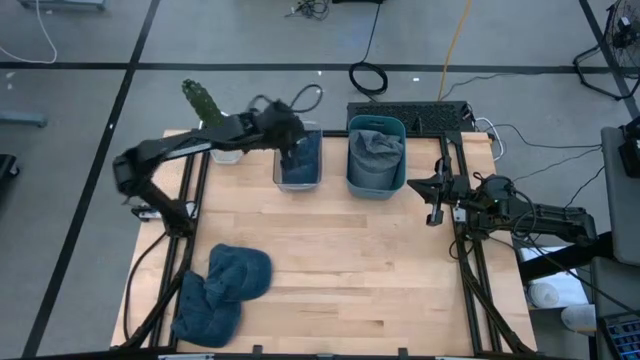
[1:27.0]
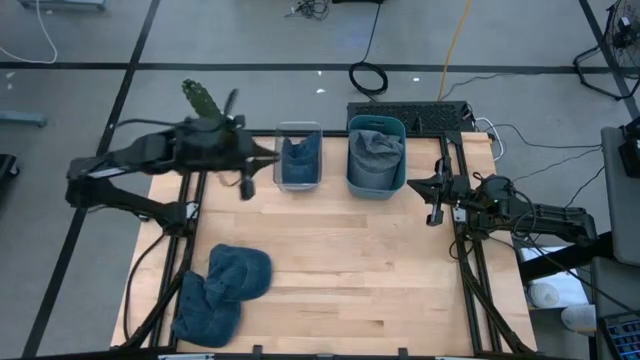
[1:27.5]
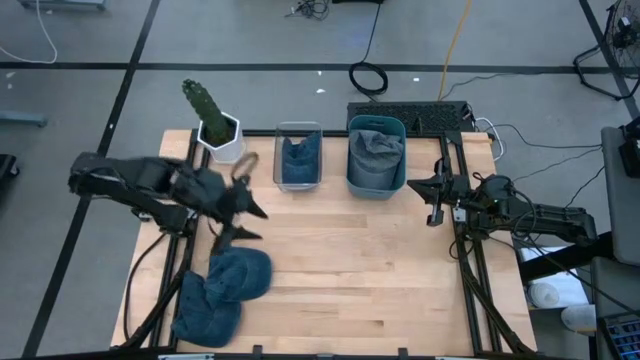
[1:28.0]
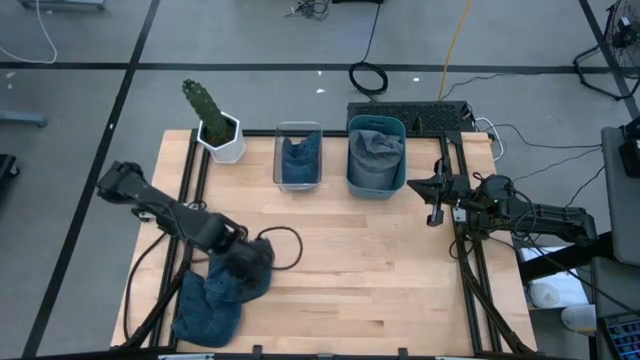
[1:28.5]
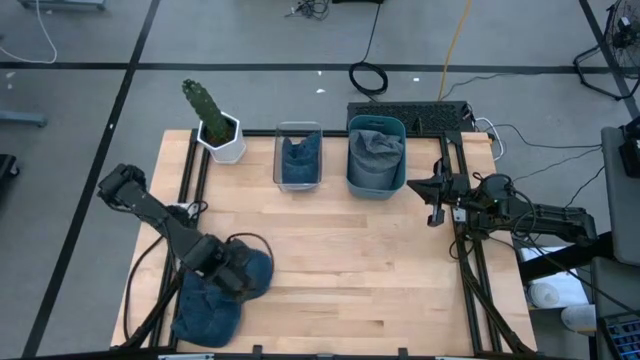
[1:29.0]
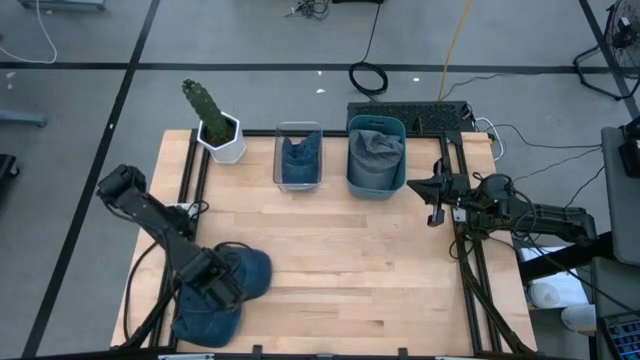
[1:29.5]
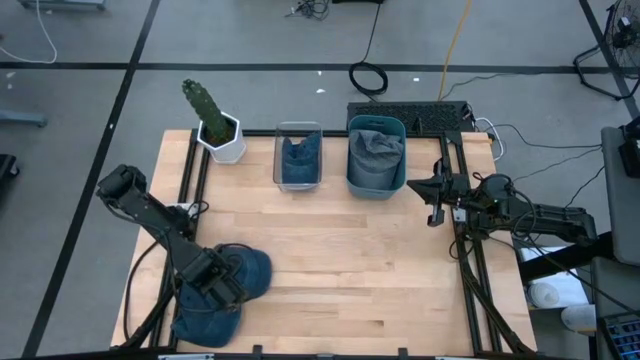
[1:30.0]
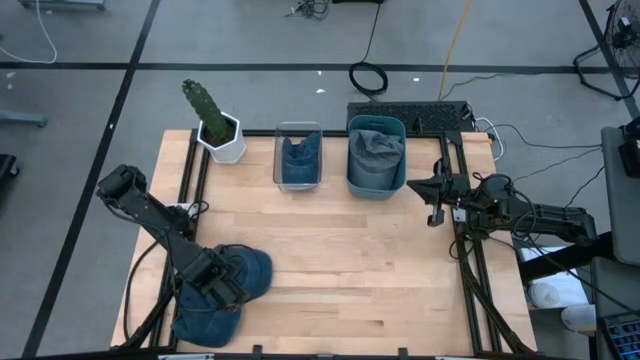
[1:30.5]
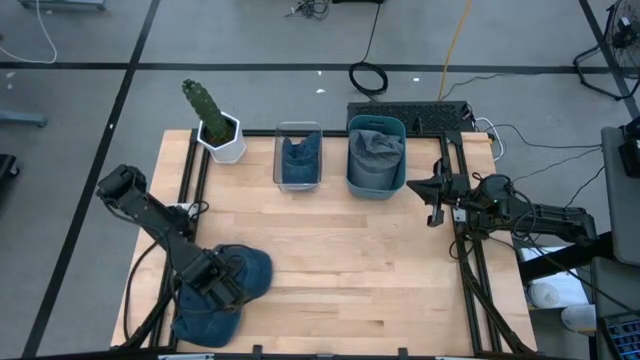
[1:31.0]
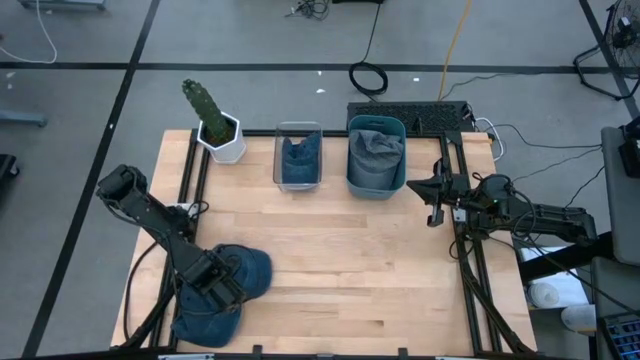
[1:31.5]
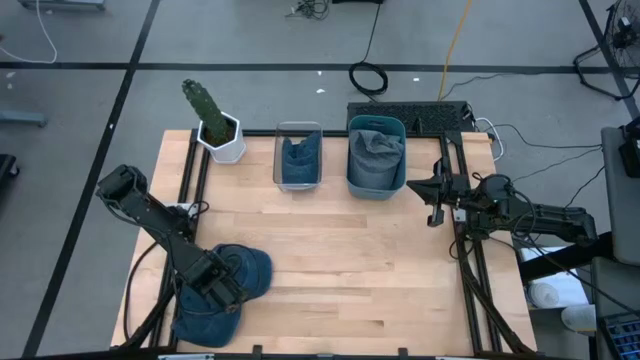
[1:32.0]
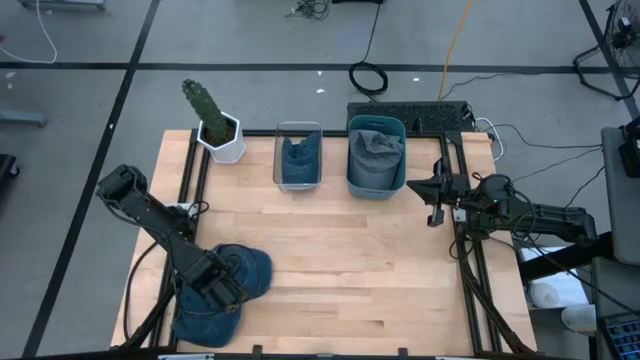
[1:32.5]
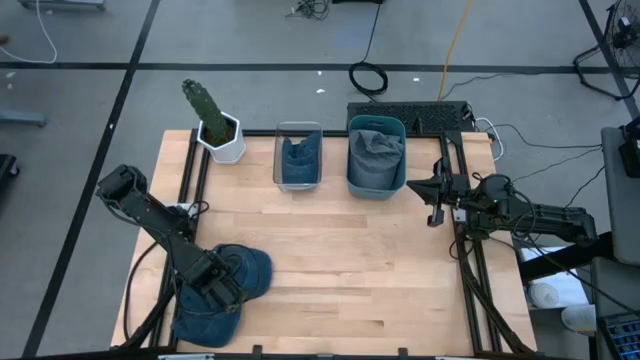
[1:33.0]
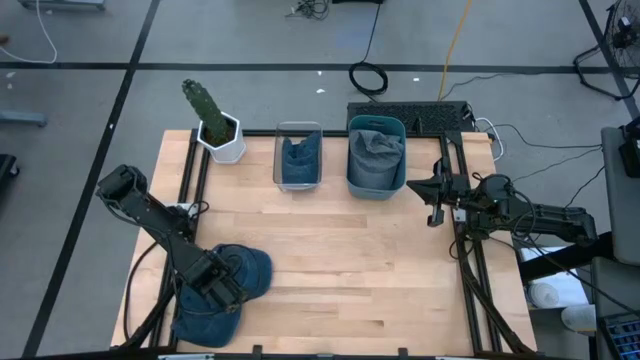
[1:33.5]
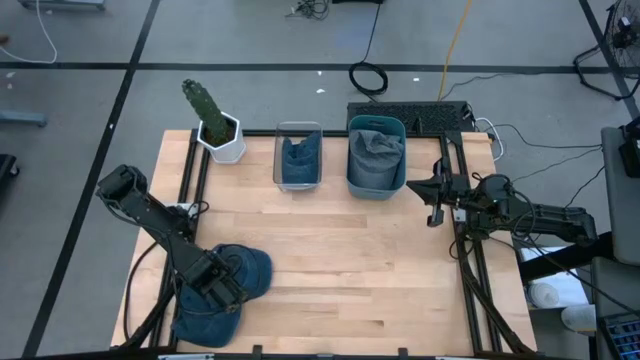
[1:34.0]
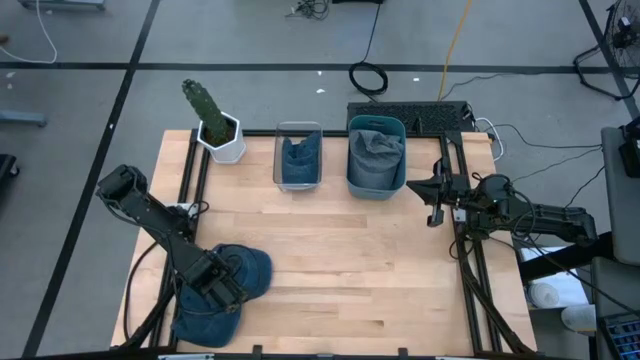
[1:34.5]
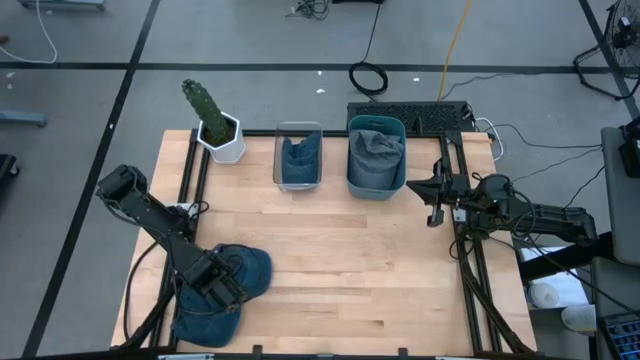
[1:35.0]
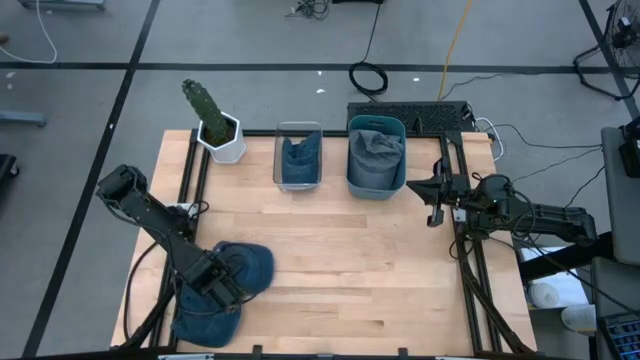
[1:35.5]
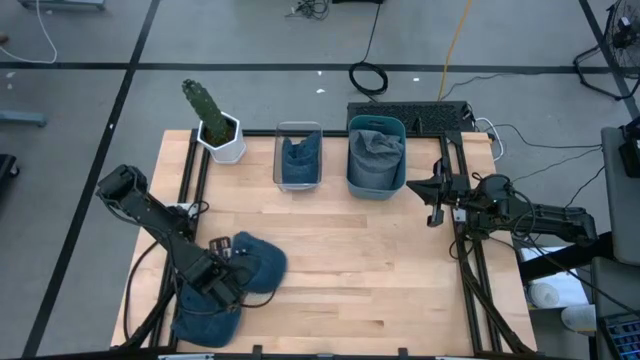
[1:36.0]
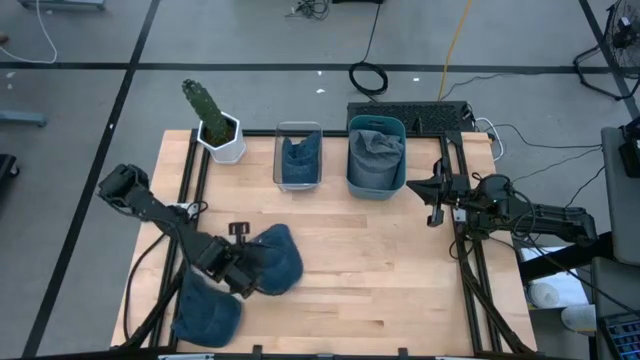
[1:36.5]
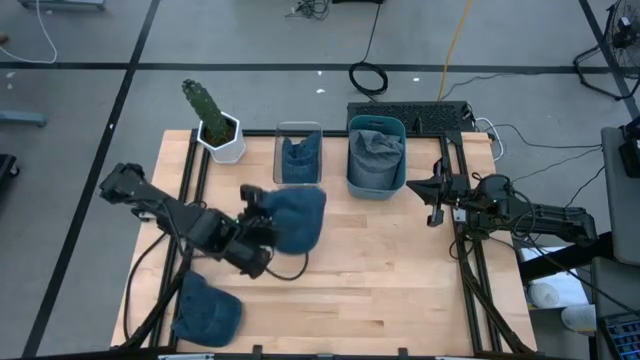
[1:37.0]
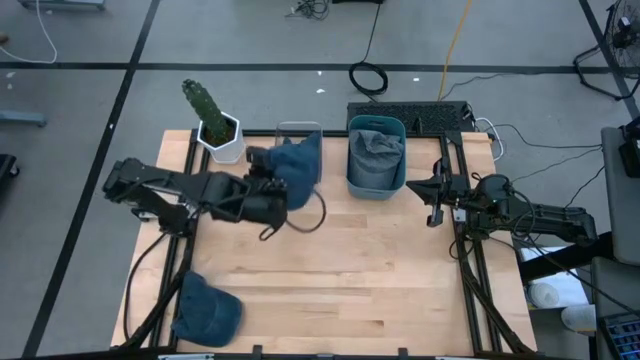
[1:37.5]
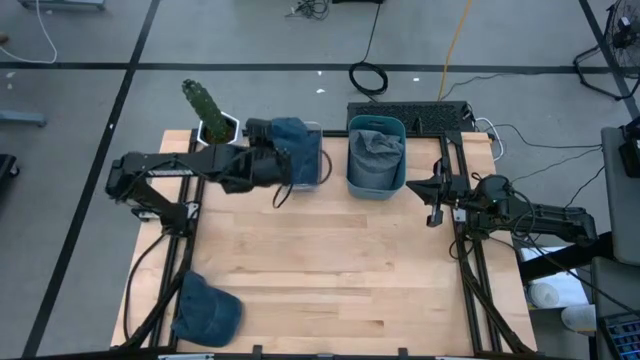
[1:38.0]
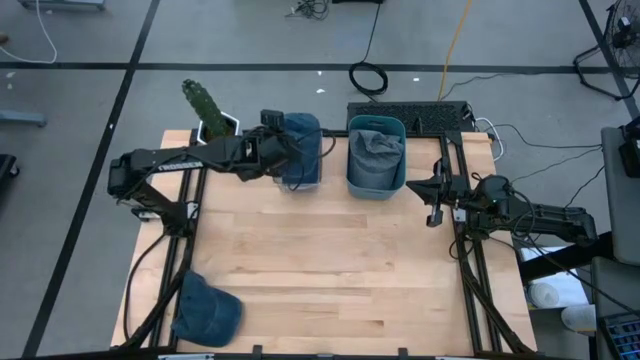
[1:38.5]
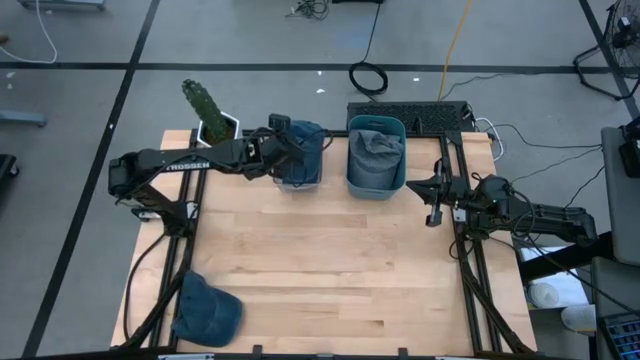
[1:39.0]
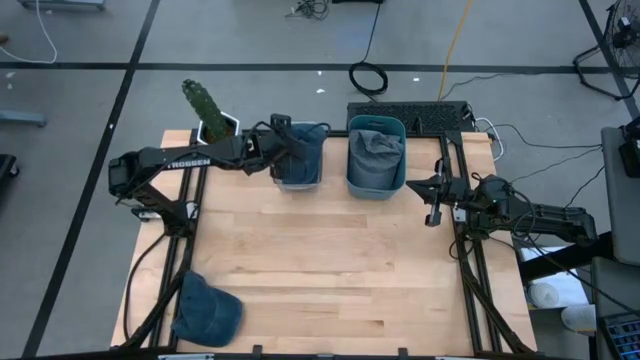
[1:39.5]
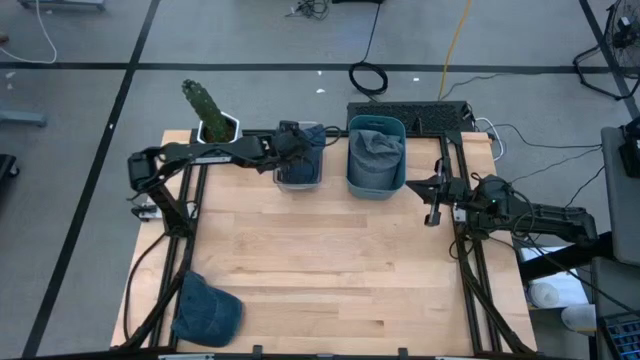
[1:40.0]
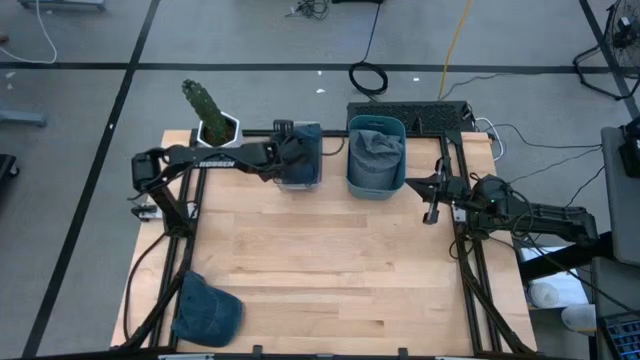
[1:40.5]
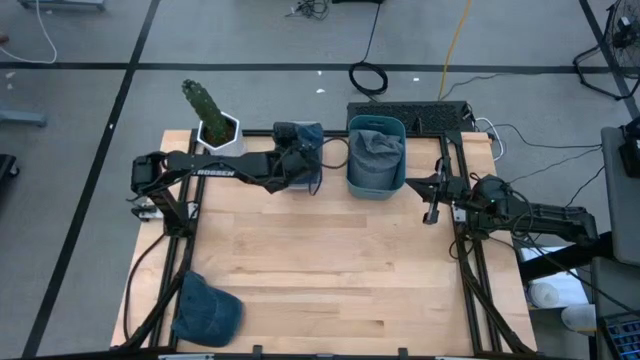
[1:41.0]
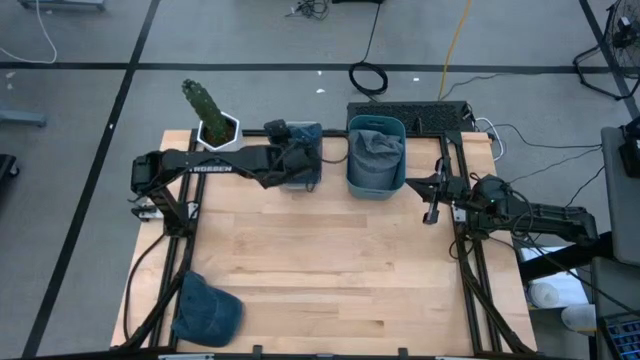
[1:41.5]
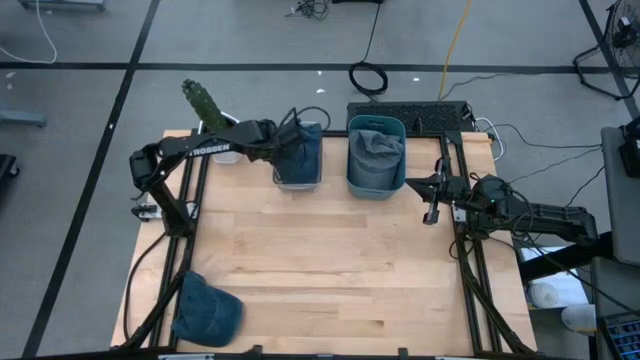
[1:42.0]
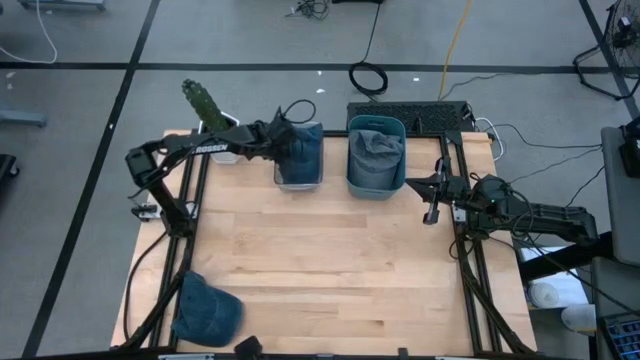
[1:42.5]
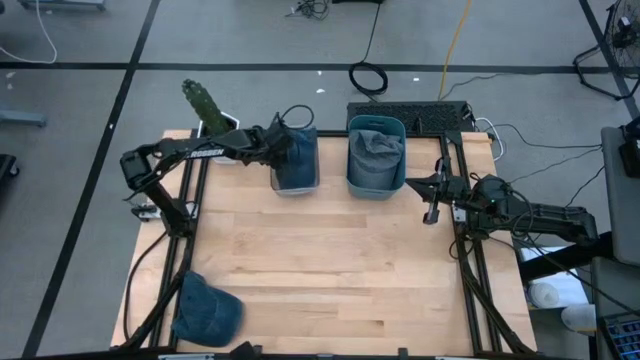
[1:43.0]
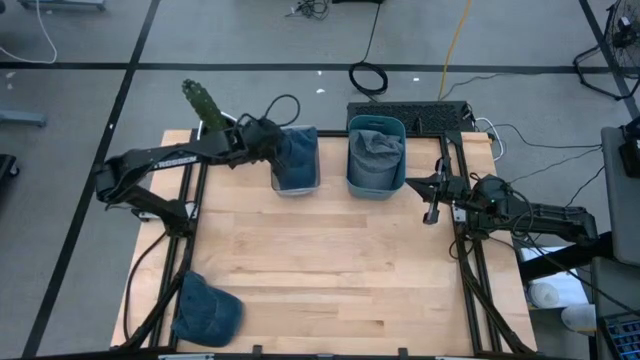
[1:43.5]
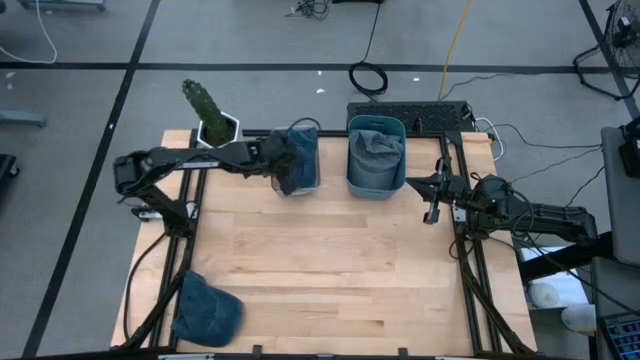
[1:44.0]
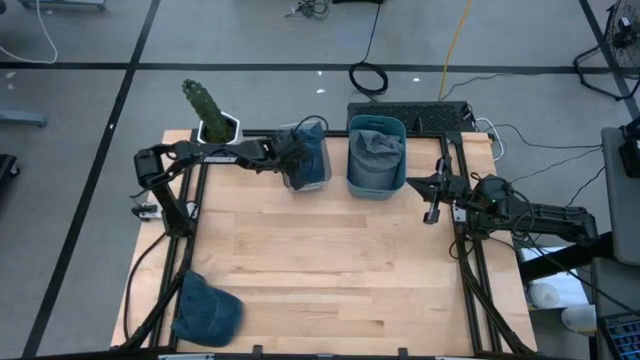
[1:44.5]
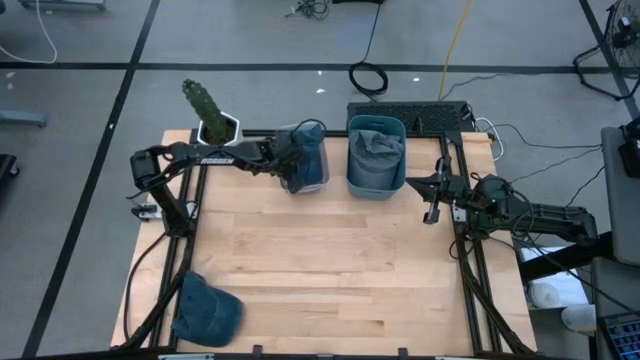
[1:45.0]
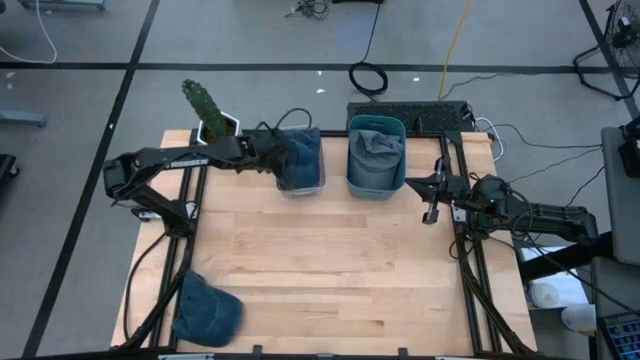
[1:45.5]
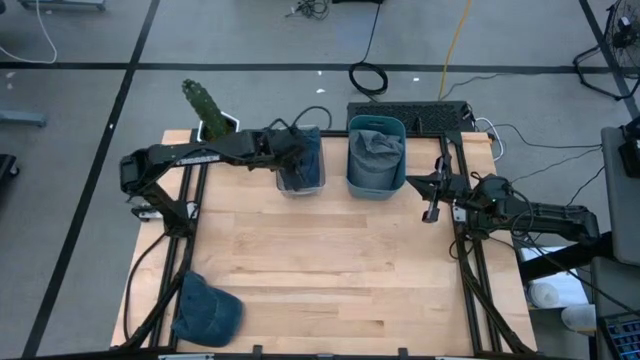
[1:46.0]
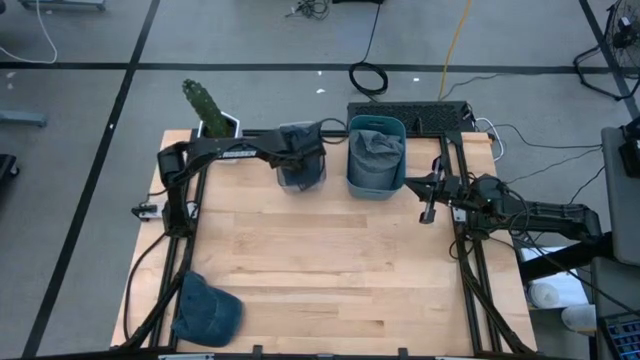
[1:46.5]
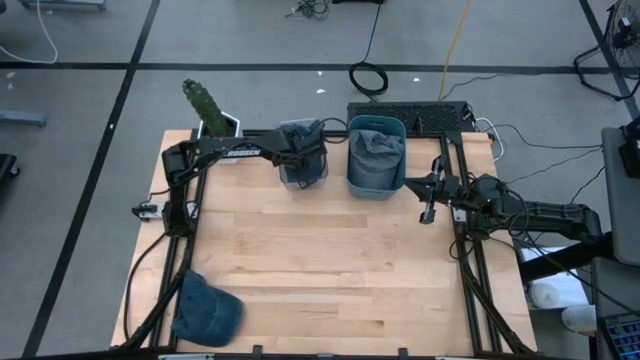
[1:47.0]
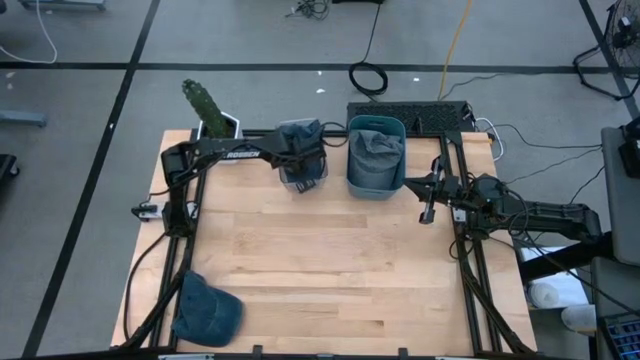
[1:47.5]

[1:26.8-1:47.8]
Task: Pick & Place hat
Put the top blue cap into the transparent bin

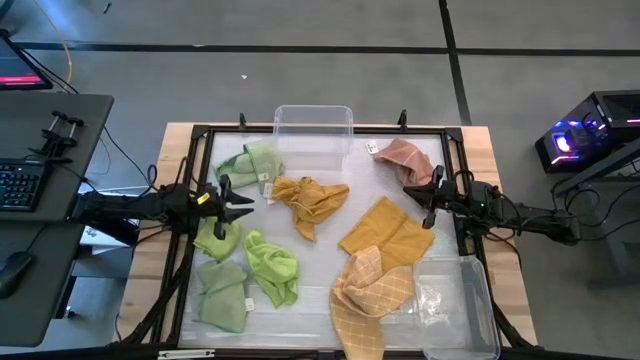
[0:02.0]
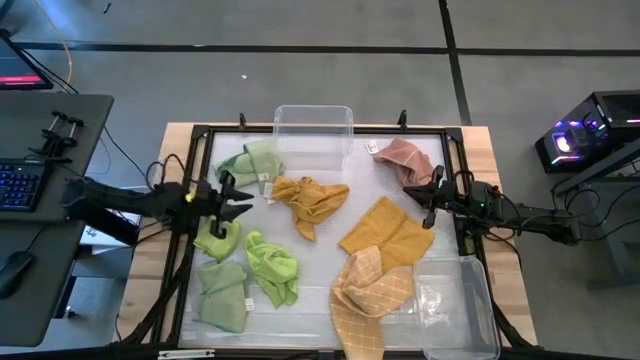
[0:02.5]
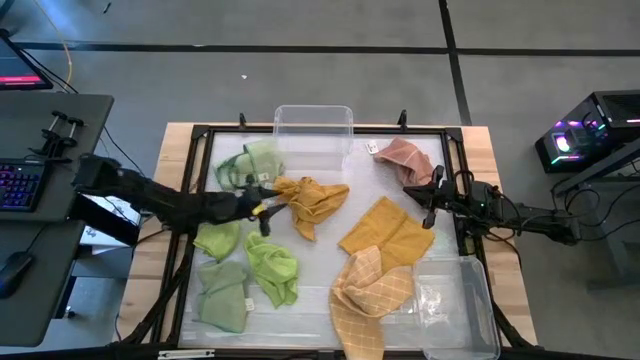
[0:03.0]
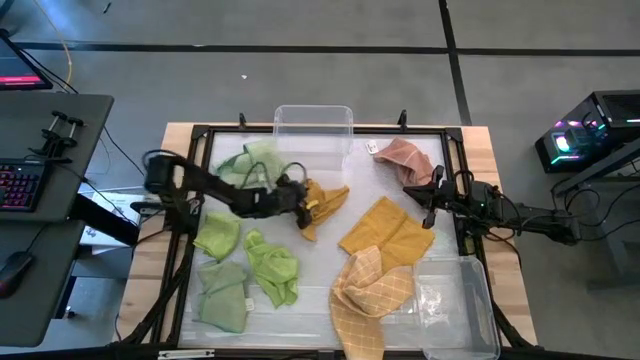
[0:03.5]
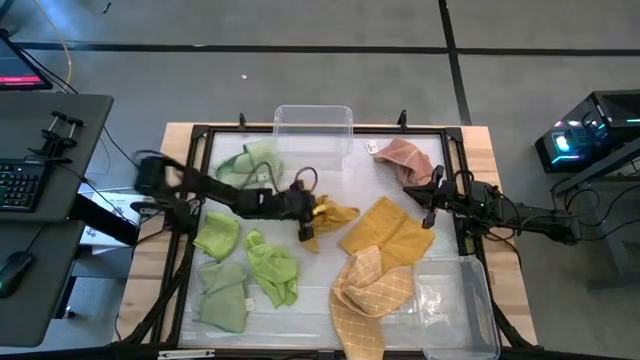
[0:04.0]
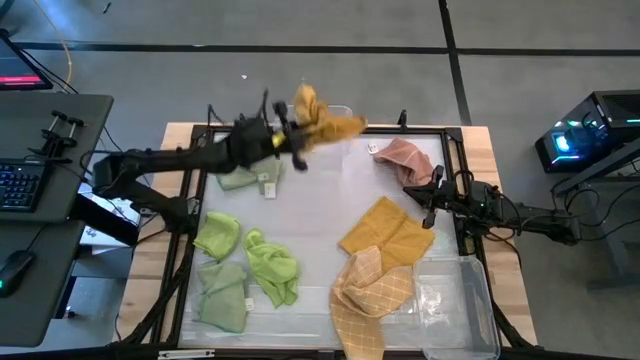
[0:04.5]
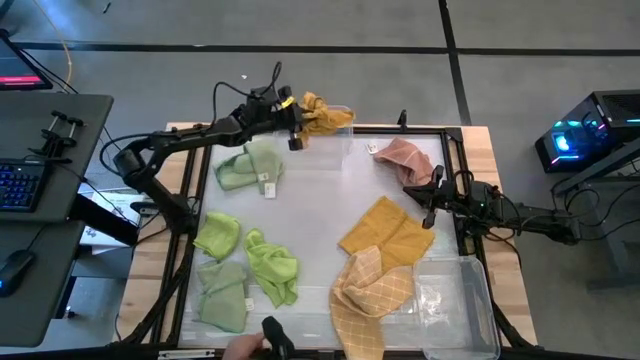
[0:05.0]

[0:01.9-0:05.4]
Task: Sort towels by color in basket
Put the left yellow towel into the top transparent bin
